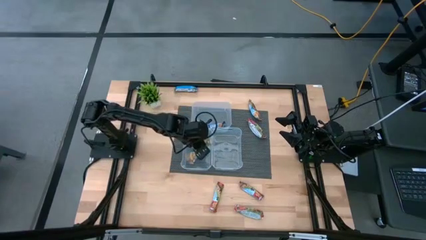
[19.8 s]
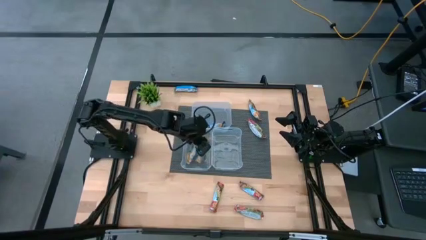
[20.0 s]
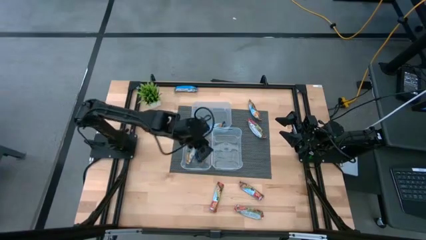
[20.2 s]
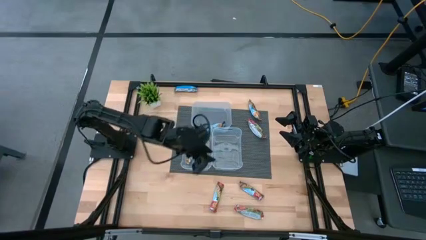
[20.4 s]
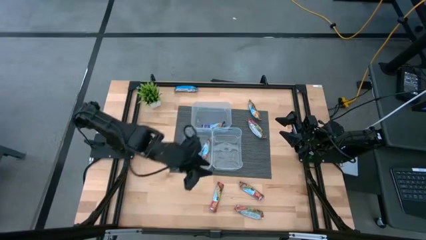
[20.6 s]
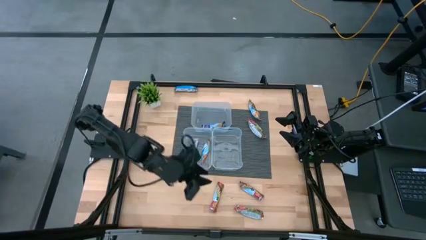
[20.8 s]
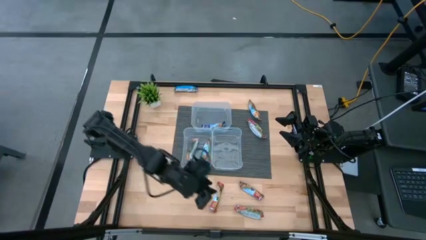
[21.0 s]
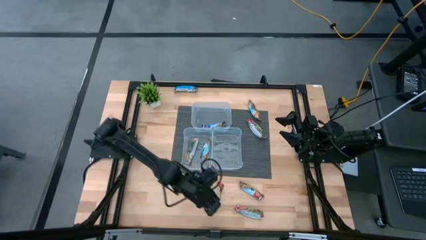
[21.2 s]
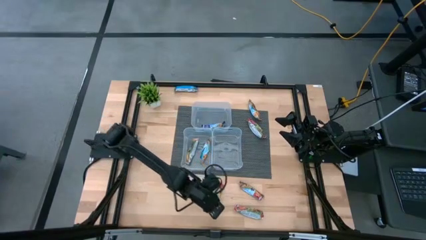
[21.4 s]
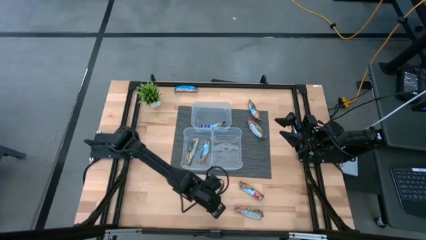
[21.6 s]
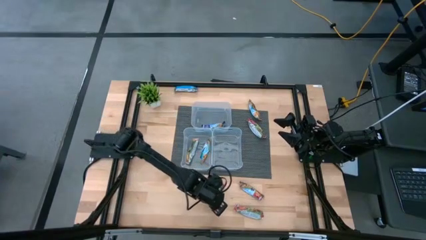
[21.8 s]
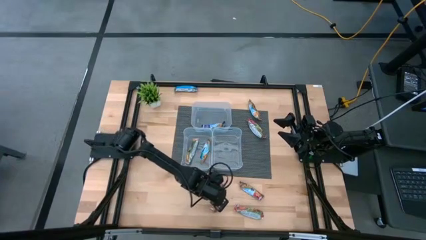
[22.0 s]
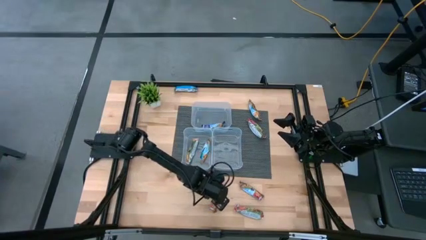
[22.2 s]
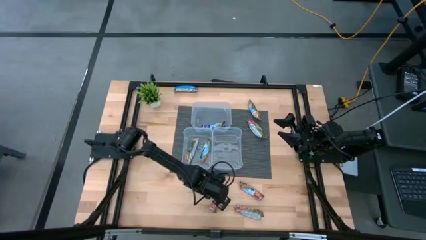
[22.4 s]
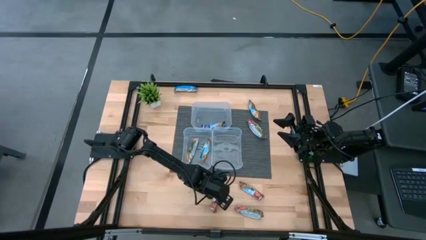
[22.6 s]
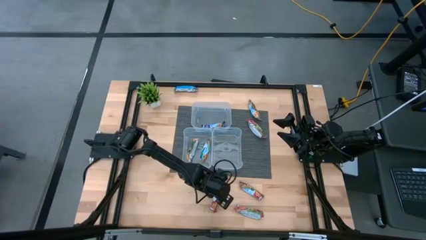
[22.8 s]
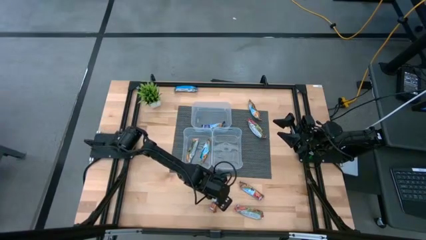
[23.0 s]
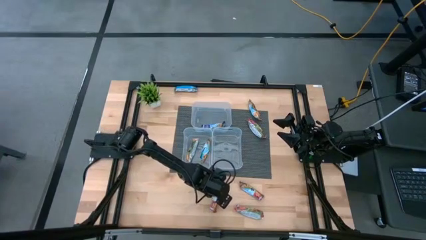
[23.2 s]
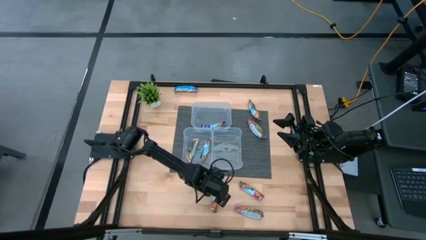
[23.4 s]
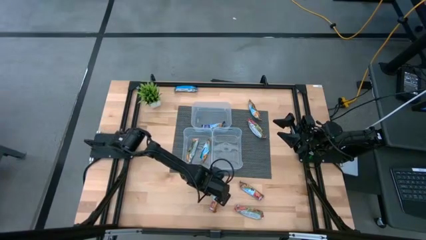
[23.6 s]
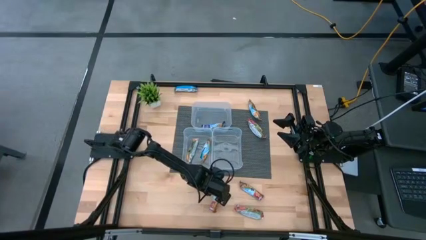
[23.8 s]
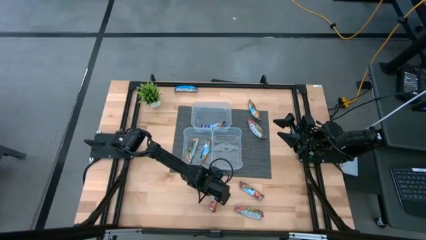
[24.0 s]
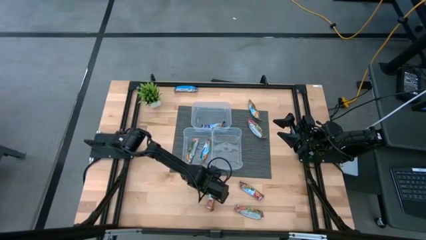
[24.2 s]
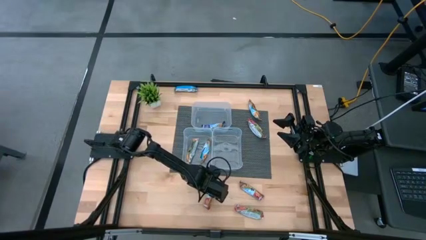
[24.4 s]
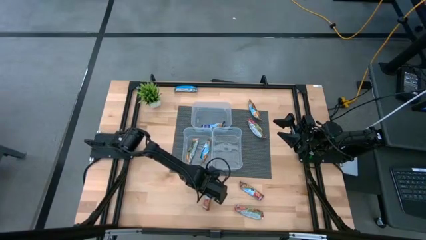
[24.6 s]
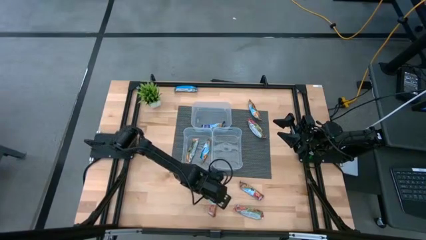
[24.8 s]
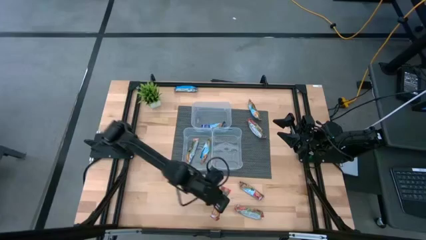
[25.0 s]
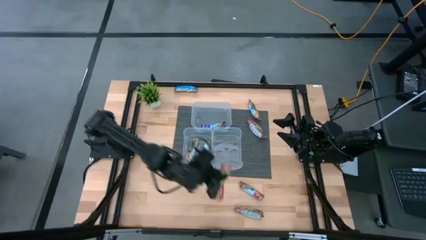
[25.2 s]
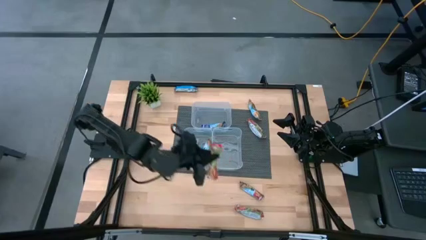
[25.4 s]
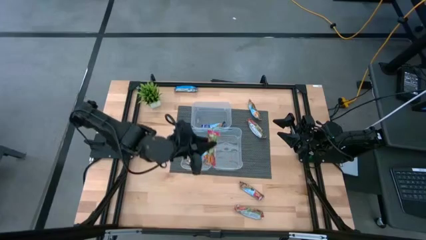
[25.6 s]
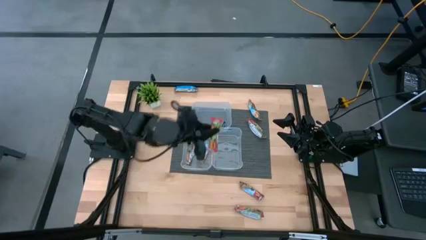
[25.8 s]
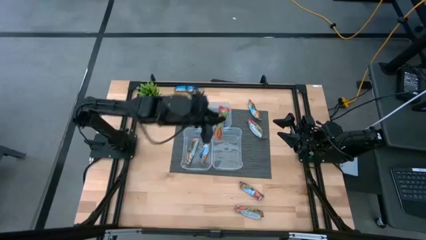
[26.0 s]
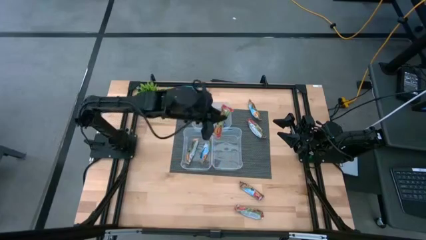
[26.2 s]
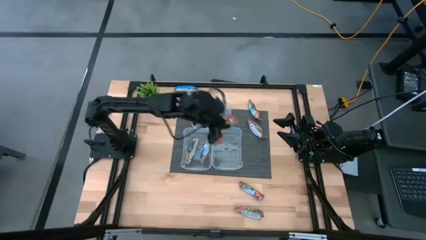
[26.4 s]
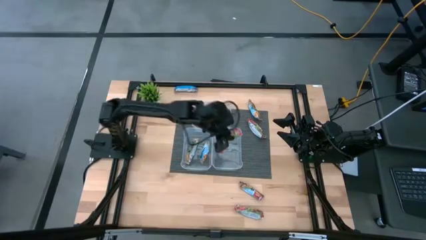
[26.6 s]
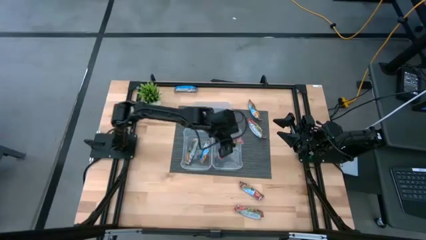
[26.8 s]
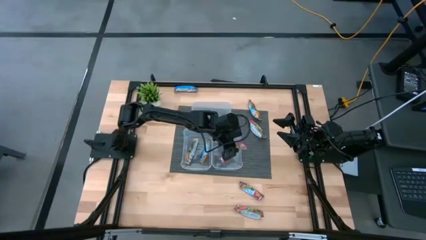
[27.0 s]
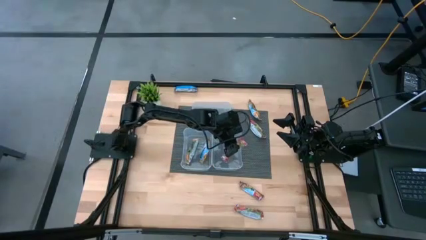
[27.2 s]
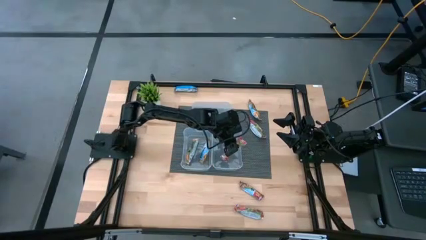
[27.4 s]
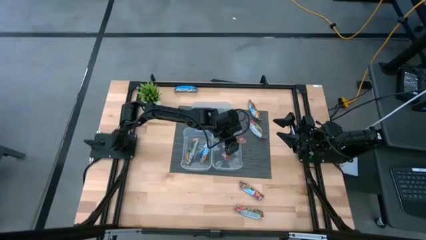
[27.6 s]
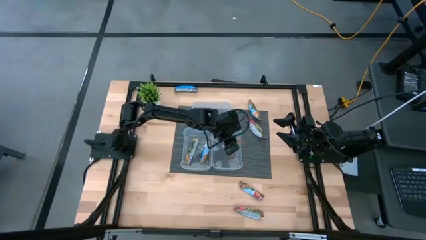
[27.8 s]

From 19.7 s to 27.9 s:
Task: Pick and place Granola Bars by type
Put the red granola bar into the bottom right transparent bin

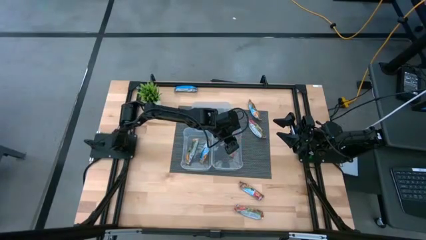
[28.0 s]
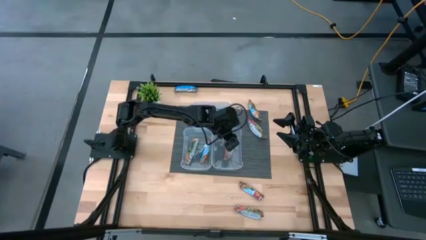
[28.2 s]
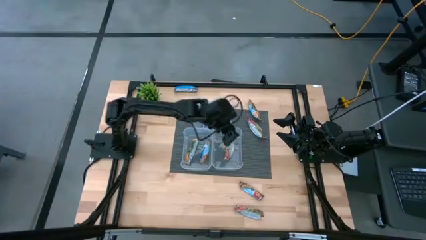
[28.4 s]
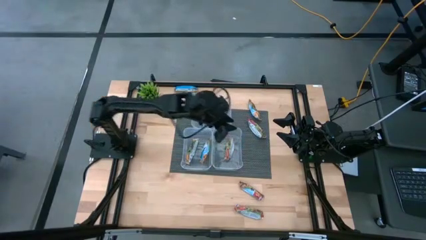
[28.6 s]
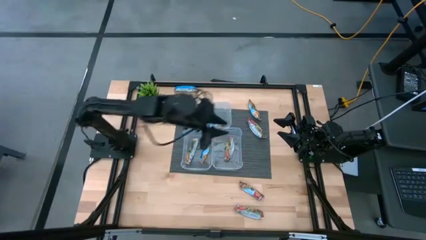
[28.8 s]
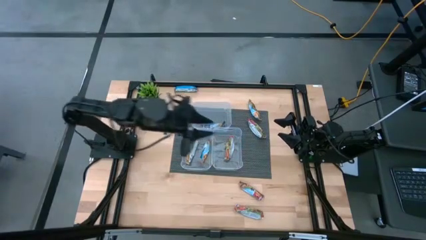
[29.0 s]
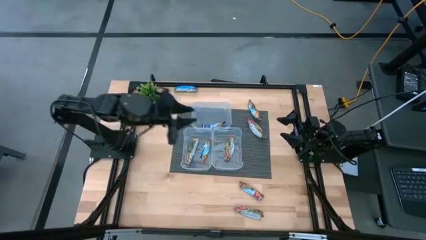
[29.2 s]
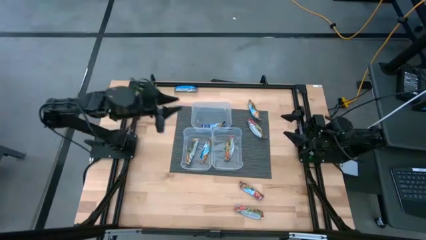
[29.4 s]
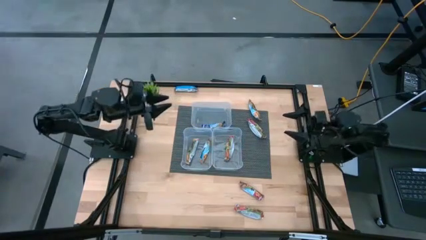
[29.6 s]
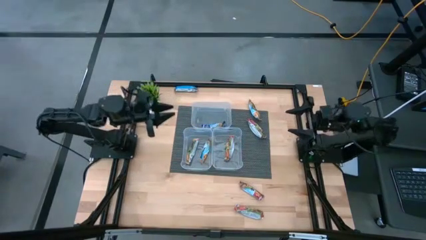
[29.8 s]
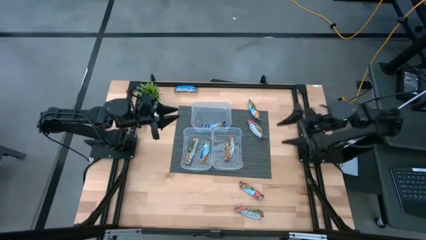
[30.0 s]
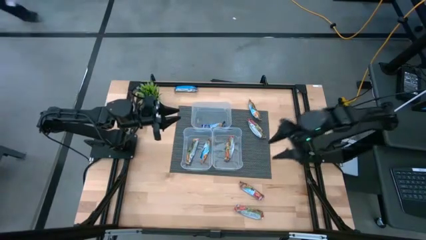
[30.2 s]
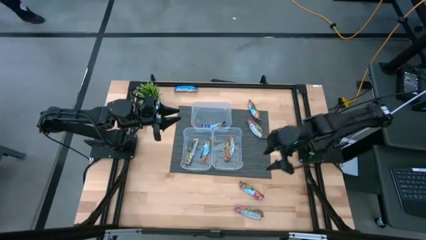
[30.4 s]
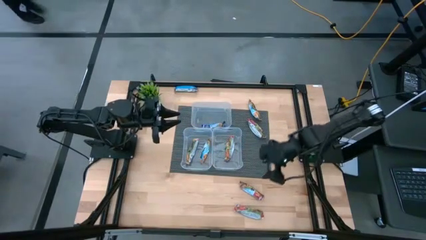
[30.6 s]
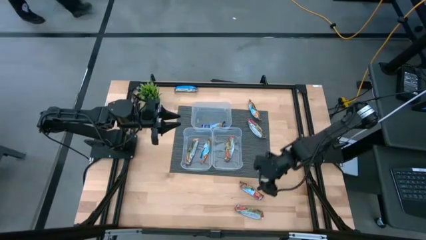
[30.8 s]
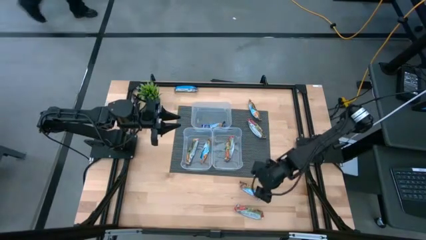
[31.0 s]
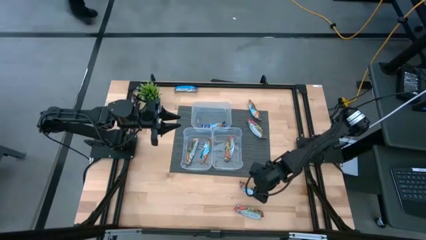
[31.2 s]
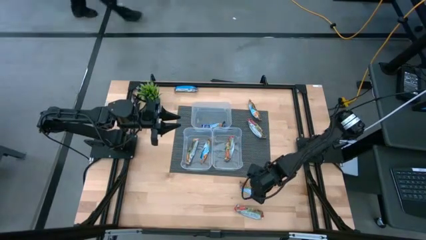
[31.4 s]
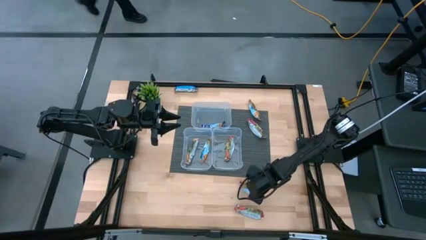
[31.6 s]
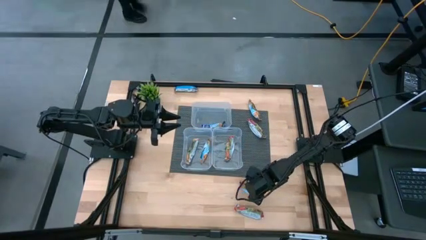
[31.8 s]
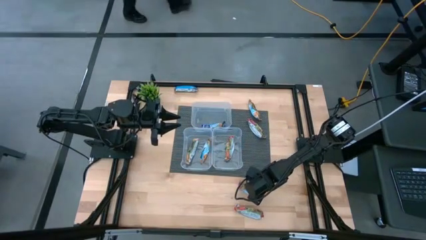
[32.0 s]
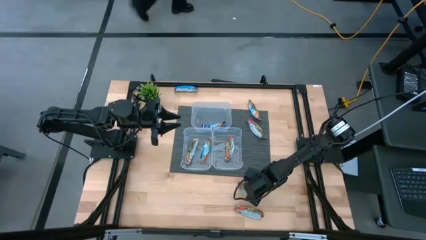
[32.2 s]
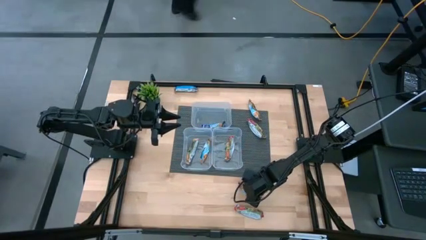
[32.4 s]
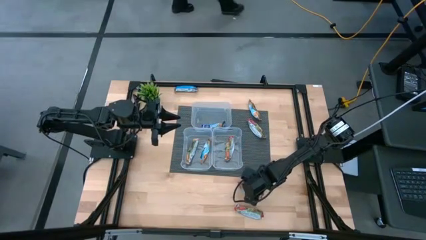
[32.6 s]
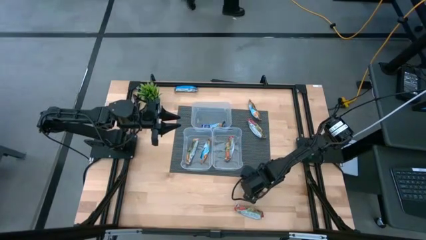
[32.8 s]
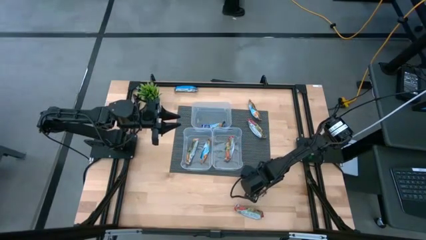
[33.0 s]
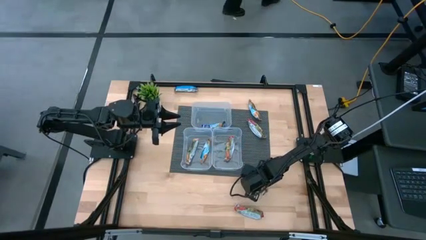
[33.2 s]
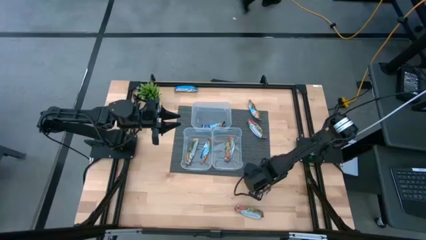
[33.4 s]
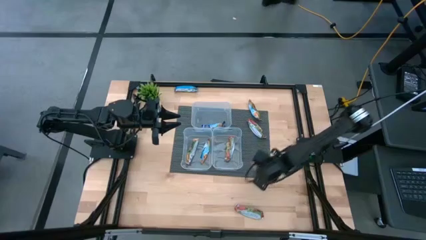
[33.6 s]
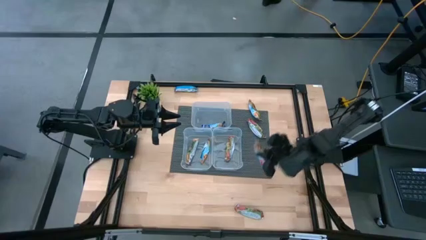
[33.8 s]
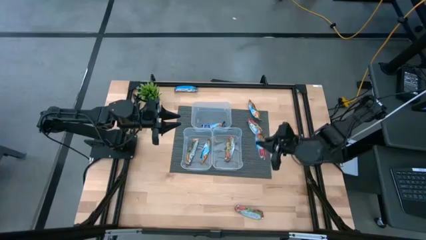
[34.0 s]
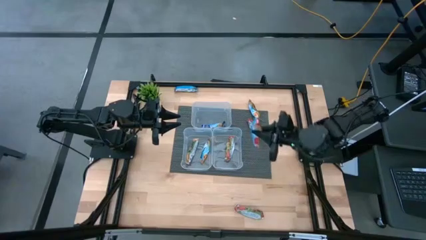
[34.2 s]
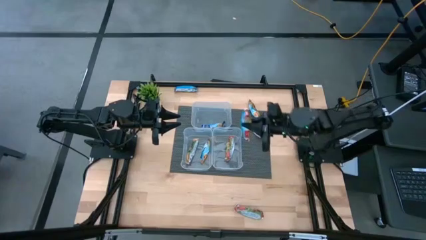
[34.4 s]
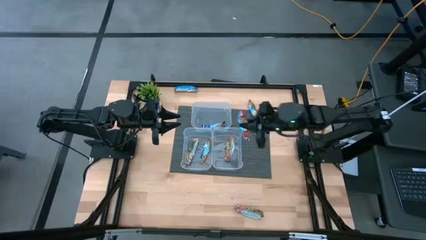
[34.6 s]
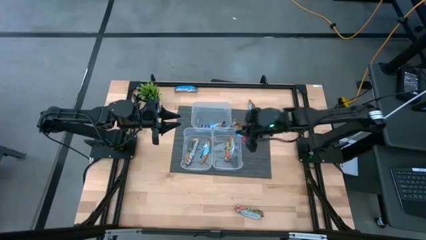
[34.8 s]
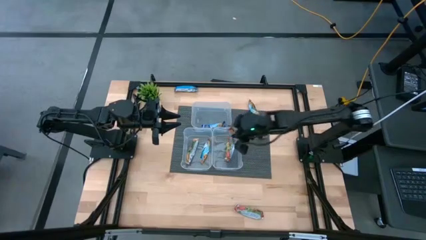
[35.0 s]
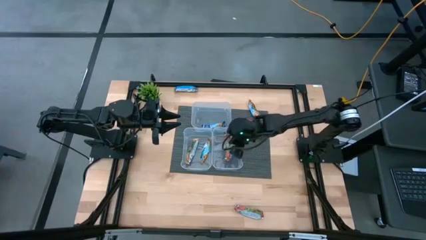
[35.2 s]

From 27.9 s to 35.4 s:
Put the red granola bar into the bottom right transparent bin

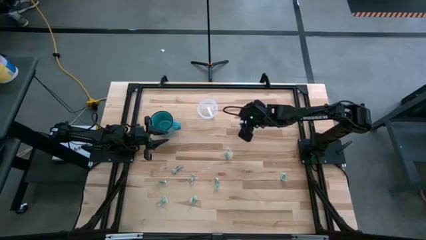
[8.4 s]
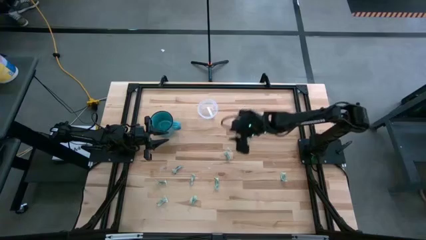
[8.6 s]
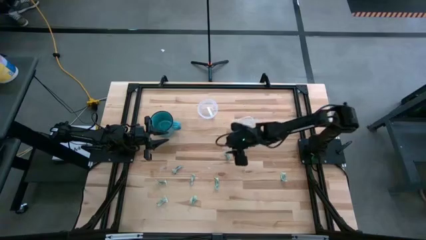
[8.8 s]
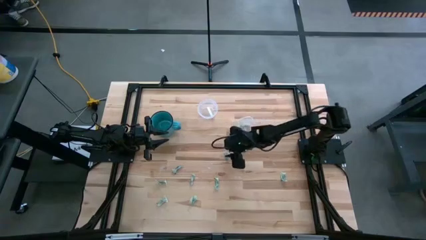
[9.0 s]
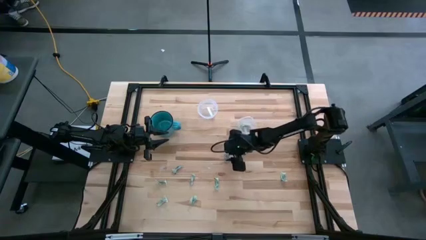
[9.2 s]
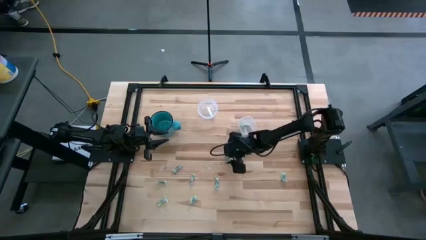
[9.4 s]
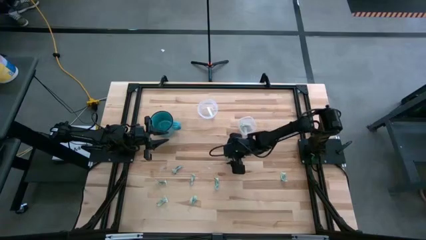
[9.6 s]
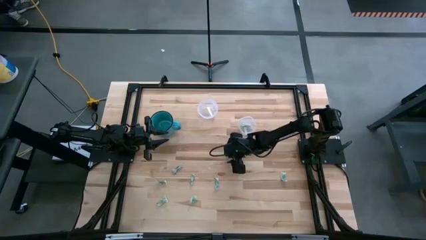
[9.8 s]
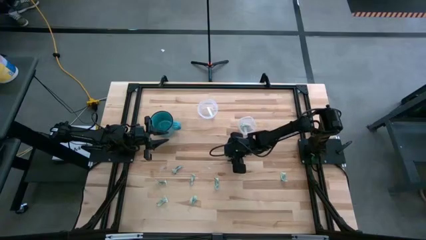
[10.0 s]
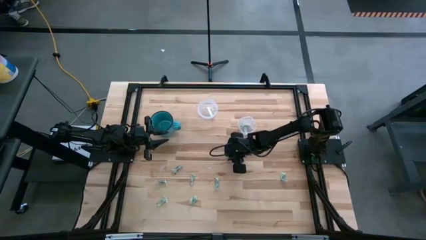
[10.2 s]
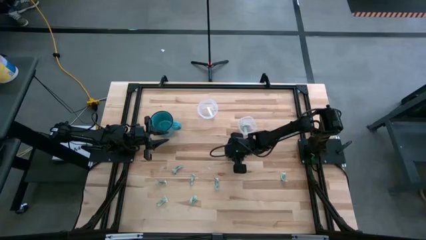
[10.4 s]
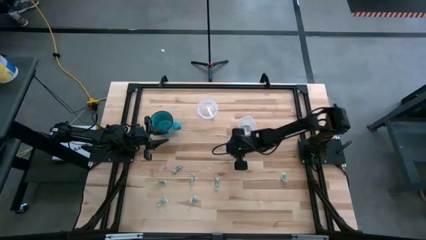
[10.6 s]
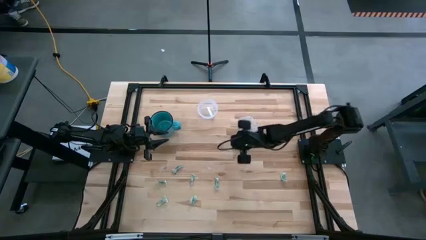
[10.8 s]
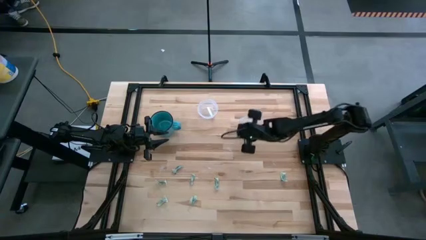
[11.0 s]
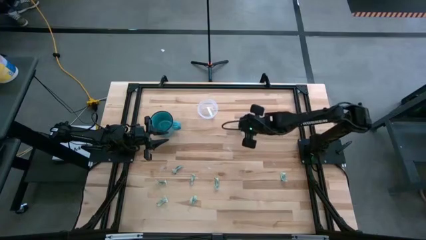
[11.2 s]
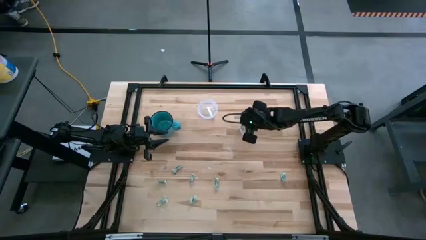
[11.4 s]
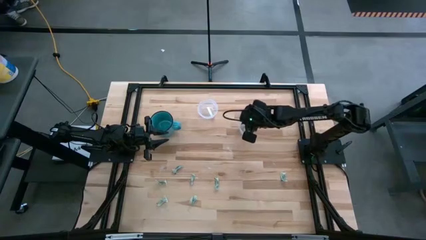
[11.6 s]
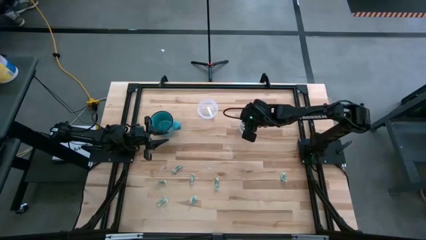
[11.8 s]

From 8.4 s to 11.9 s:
Task: Pick and place items into bin
Put the stevia packet into the small transparent bin
